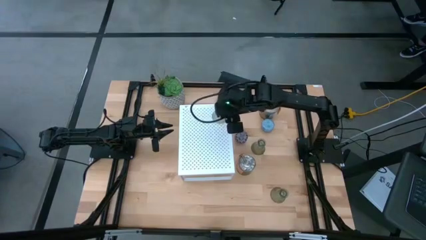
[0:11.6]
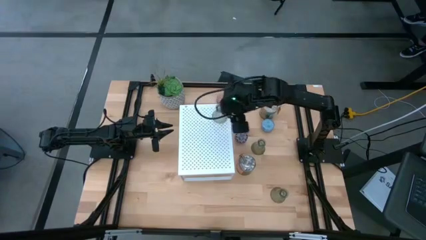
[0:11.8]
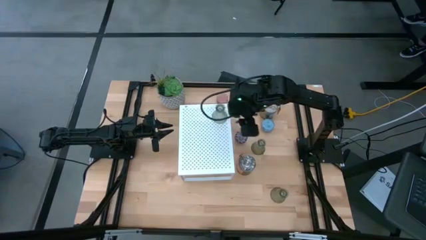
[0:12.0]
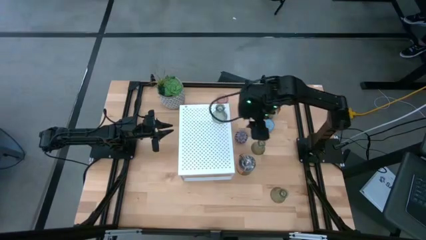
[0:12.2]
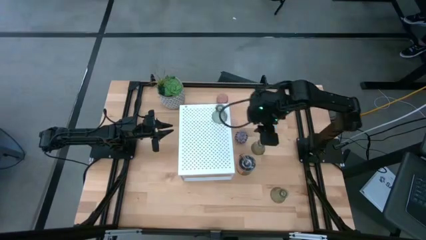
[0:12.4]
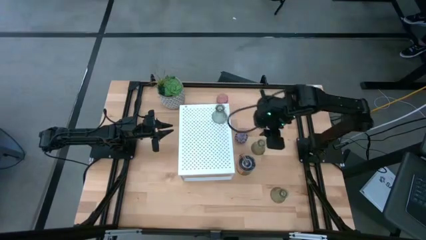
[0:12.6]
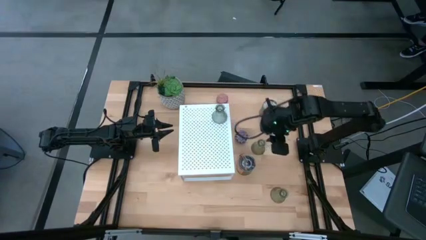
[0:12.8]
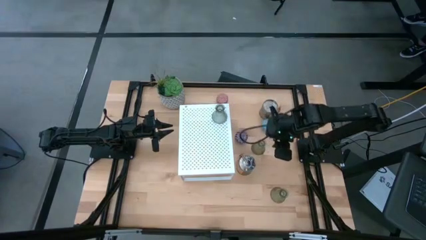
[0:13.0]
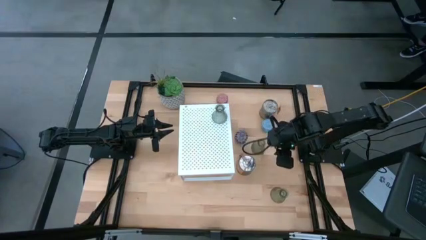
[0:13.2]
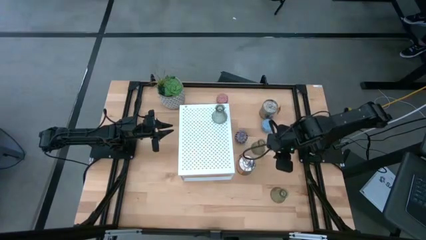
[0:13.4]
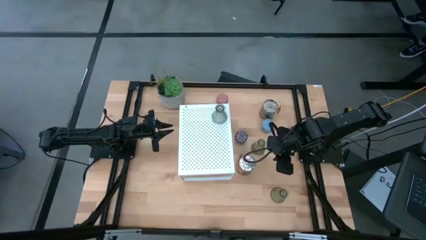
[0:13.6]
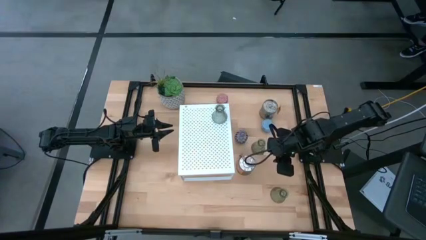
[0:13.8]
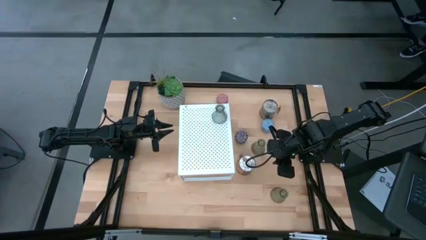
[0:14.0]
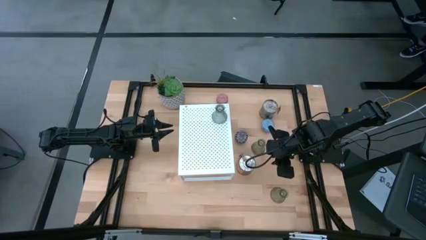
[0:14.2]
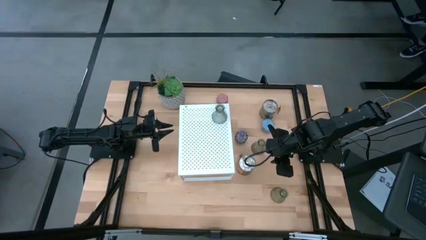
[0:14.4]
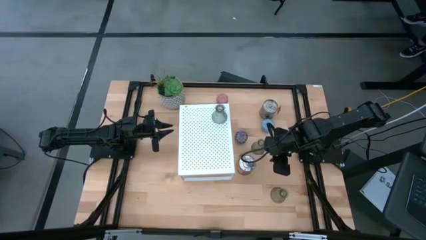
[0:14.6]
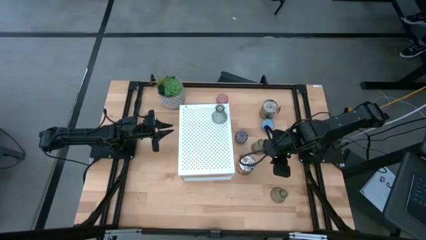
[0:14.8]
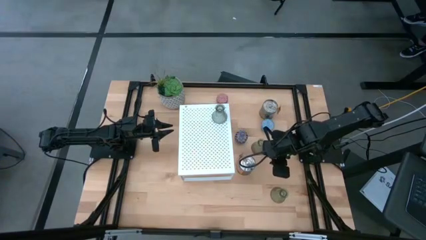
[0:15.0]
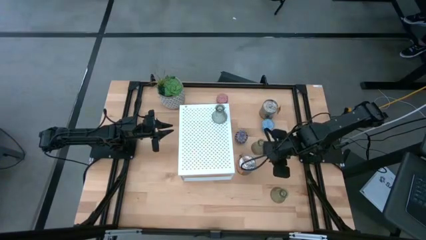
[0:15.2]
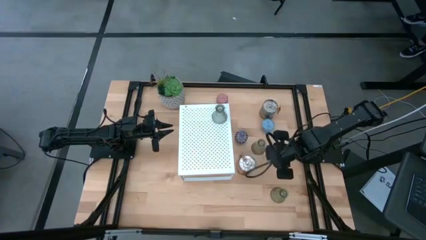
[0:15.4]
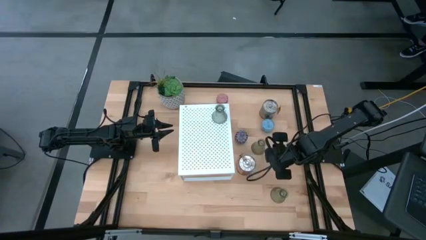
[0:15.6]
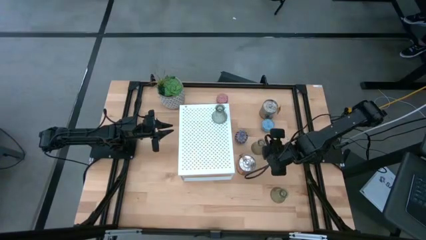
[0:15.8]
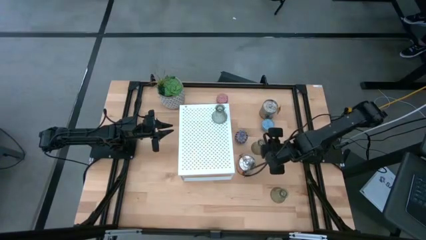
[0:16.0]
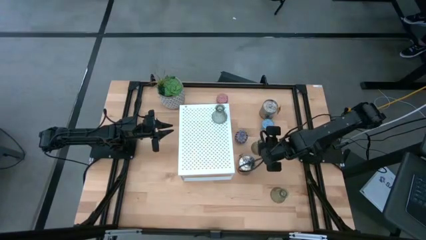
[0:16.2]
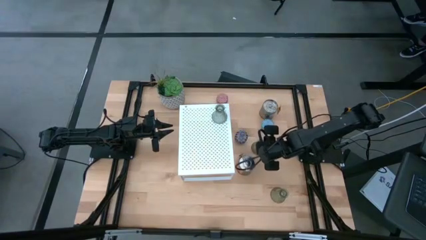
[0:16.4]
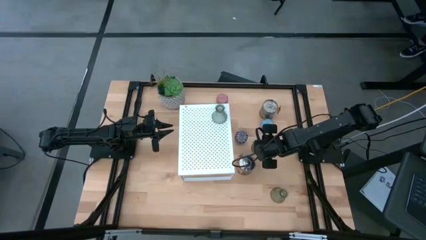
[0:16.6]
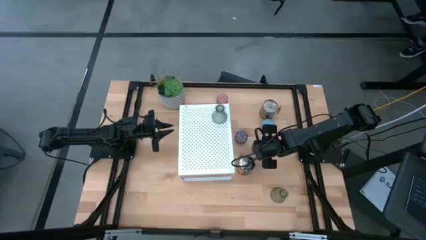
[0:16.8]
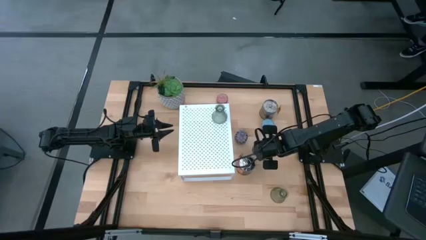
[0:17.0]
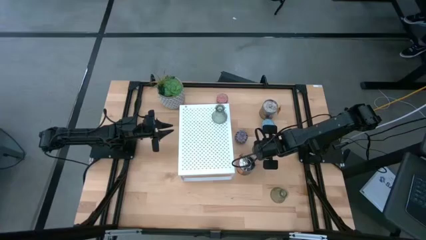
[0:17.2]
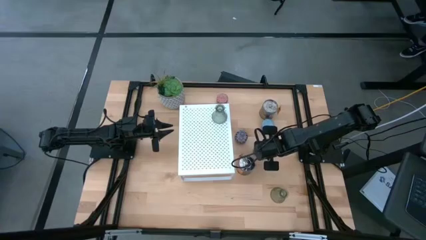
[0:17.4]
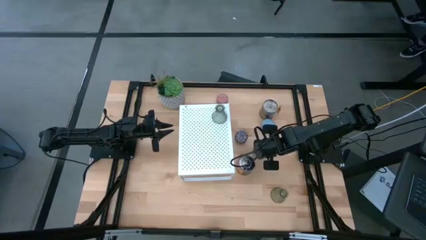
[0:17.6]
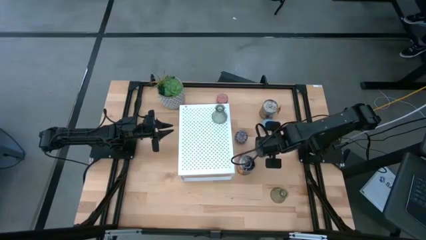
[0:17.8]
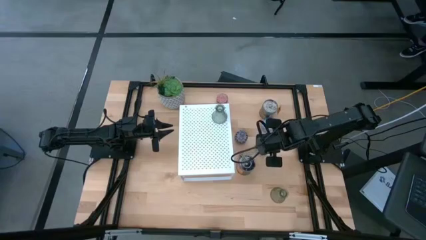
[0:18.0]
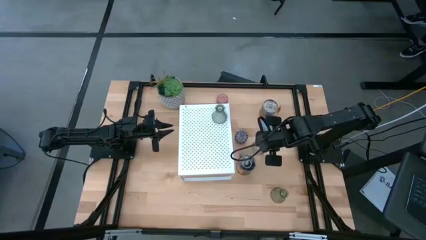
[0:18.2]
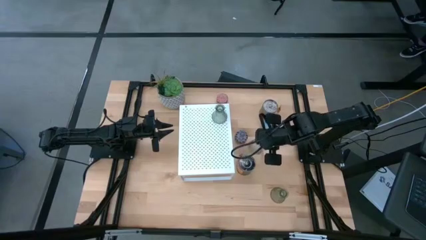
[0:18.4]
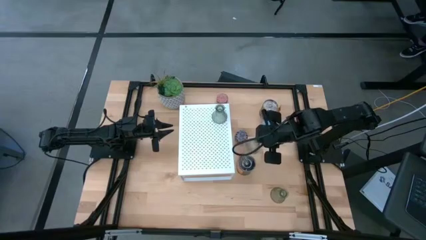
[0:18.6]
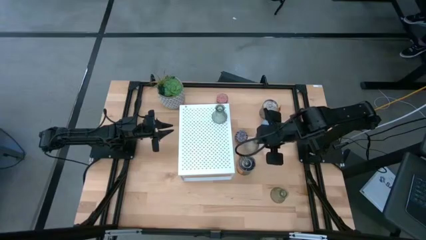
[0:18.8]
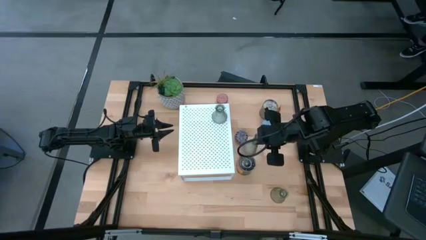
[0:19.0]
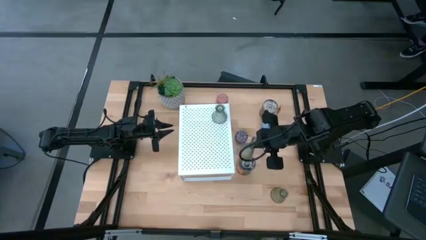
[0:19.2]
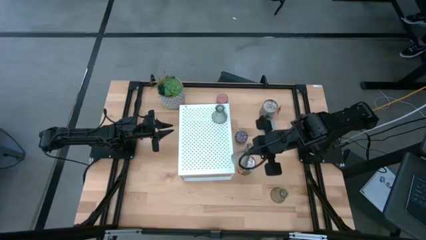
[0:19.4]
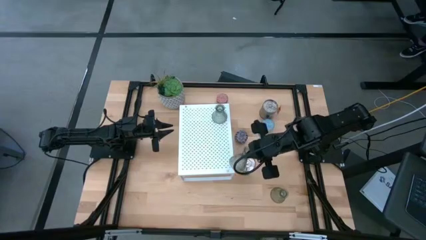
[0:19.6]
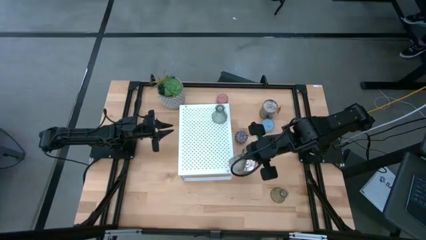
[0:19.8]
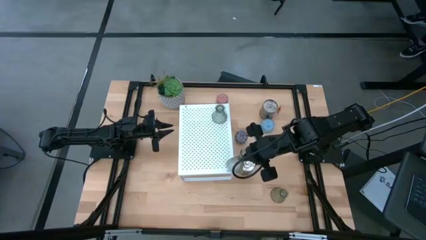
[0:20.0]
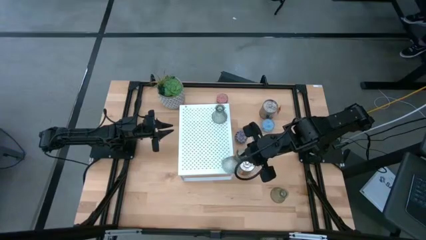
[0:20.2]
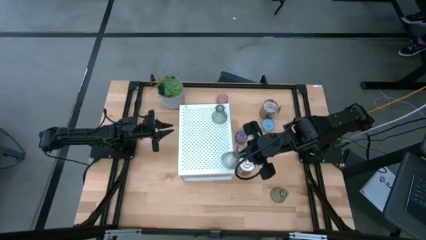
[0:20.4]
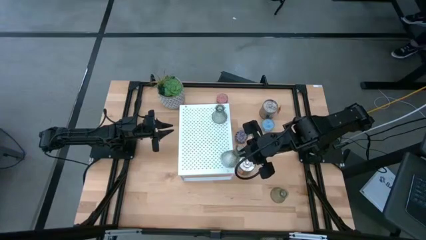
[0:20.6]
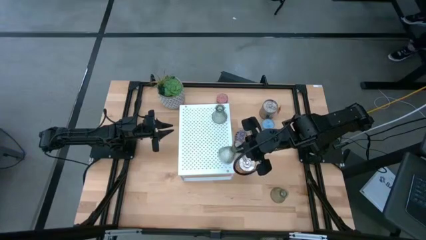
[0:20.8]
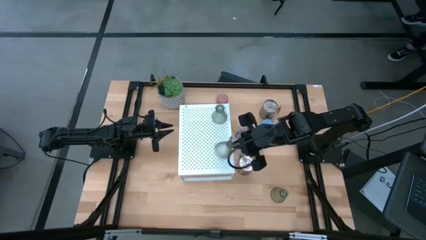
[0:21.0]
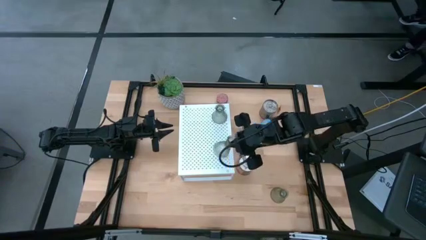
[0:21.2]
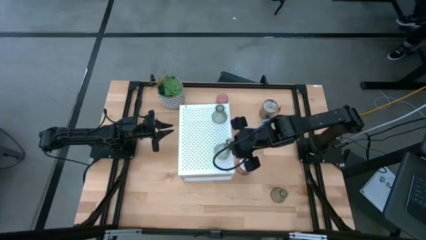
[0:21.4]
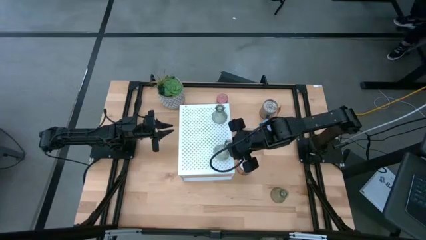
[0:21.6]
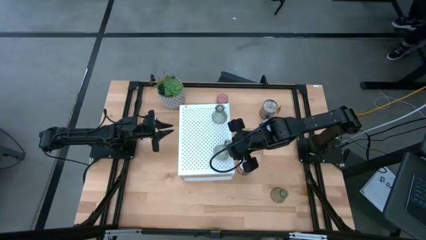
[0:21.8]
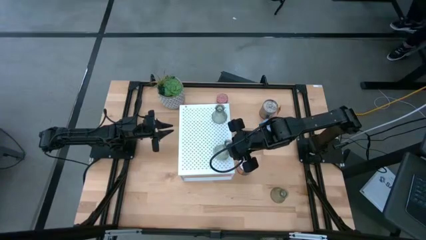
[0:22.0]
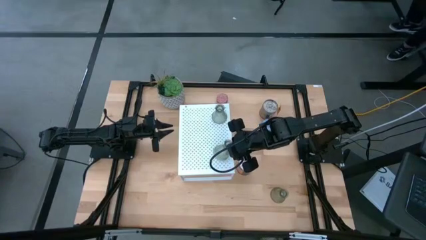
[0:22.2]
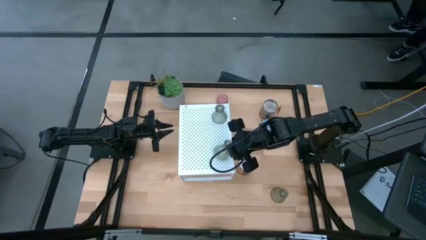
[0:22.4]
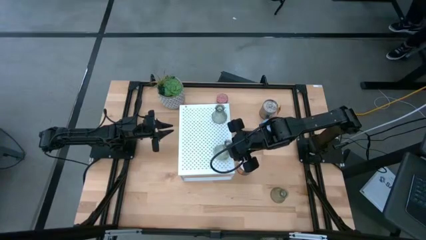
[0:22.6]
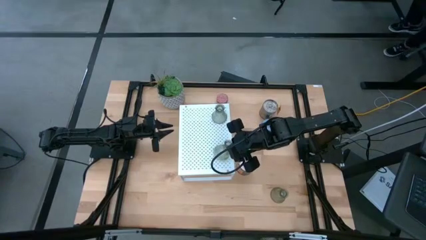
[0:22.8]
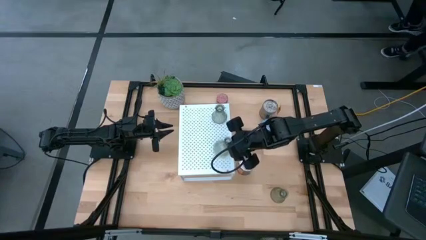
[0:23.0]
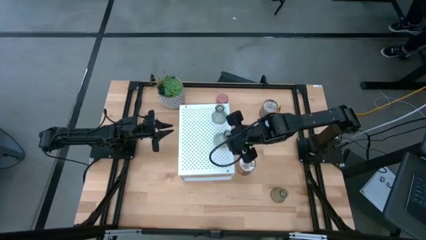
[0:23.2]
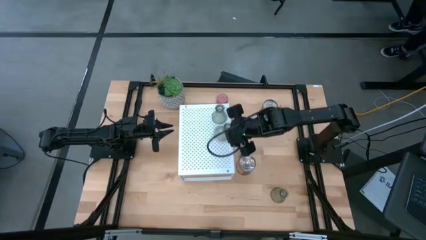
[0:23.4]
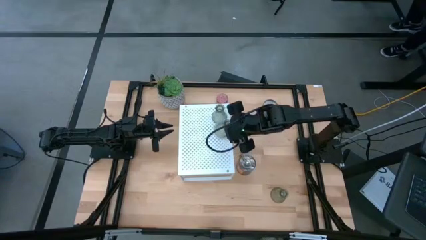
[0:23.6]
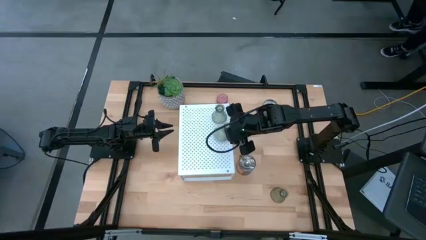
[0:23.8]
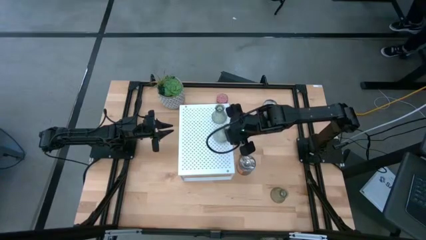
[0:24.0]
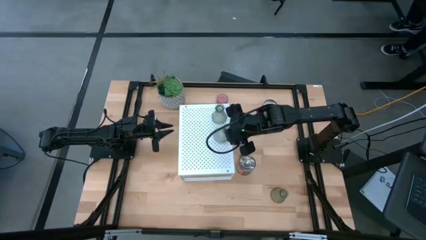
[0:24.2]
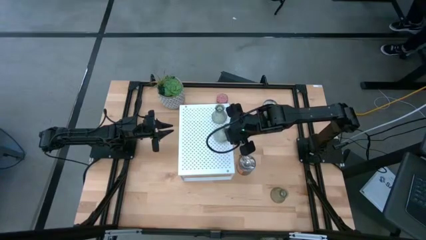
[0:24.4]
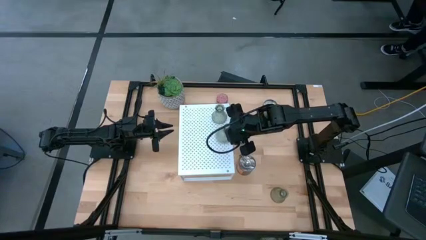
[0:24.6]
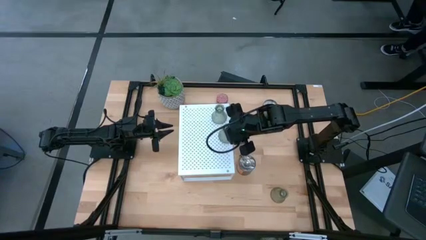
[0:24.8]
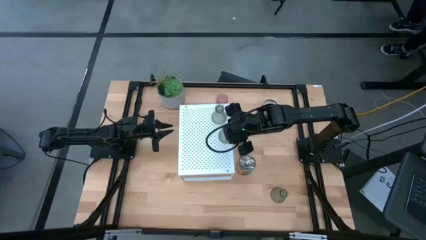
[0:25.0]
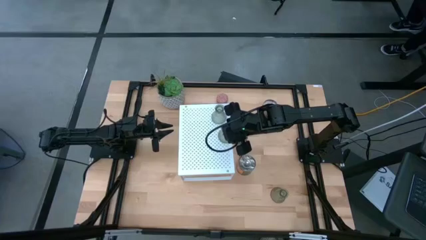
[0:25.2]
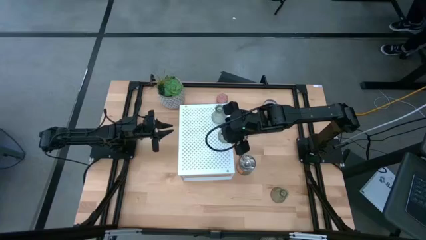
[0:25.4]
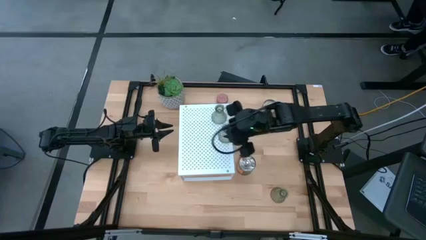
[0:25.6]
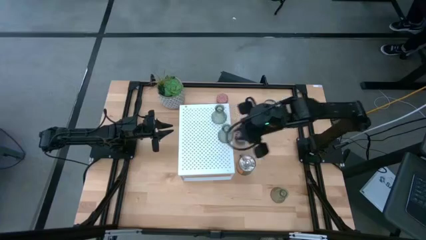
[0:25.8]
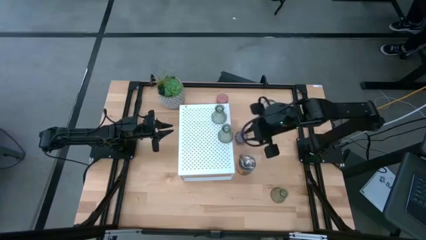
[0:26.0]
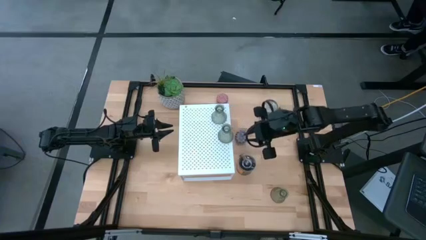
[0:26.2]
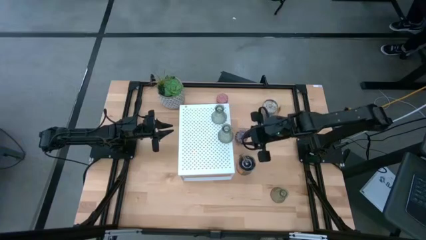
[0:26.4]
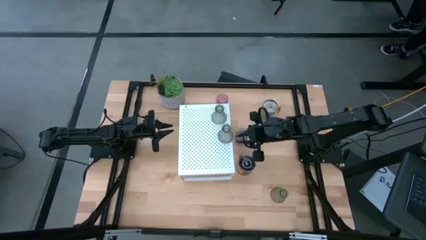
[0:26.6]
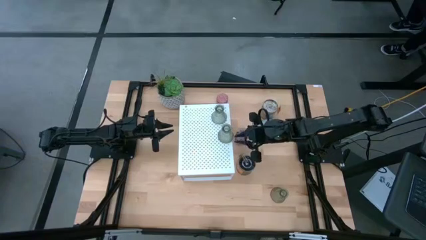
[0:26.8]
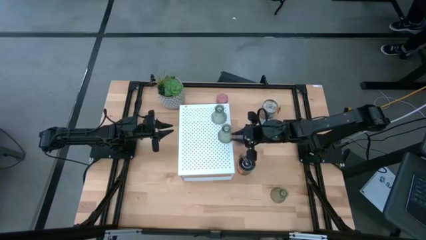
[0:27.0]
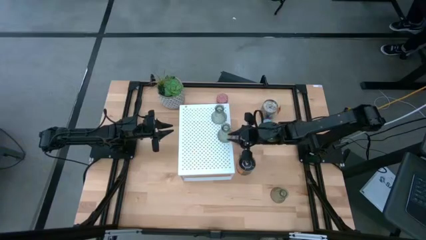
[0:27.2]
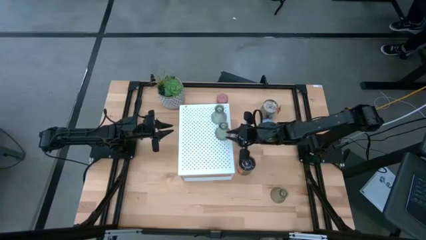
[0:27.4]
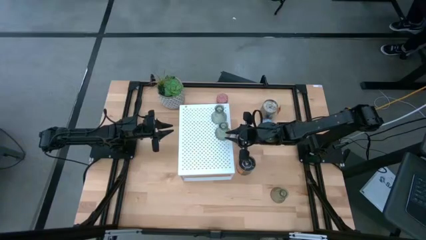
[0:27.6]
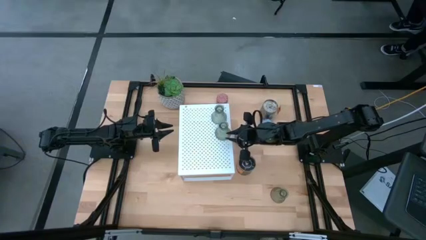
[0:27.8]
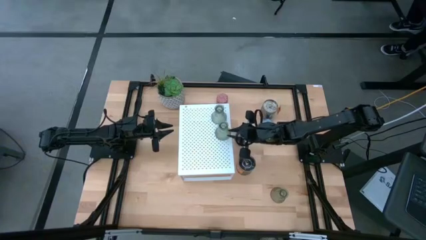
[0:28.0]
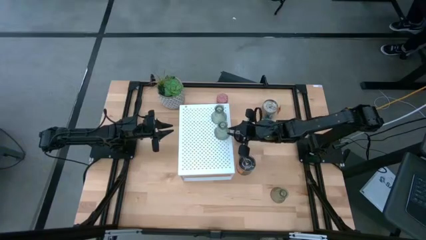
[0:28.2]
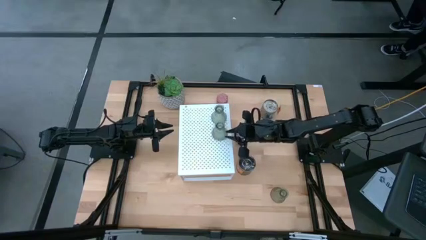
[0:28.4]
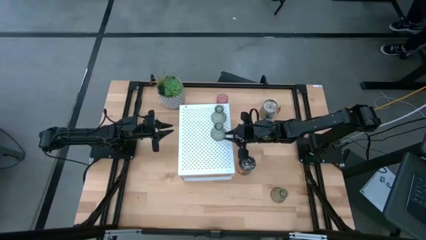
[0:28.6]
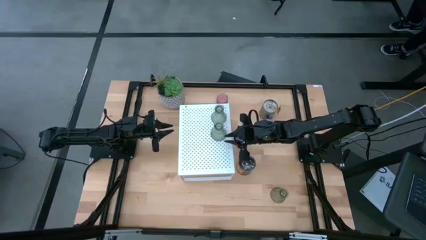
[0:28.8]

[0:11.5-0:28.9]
Task: Pick & Place candle stick holders
Align the left green glass candle holder with the other green glass candle holder on the shelf
